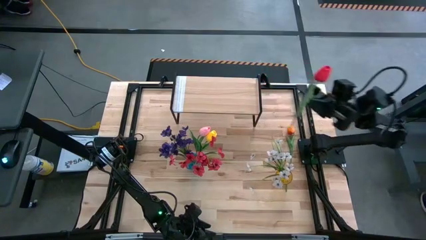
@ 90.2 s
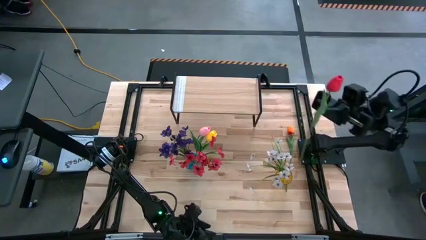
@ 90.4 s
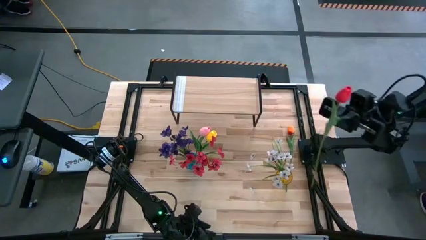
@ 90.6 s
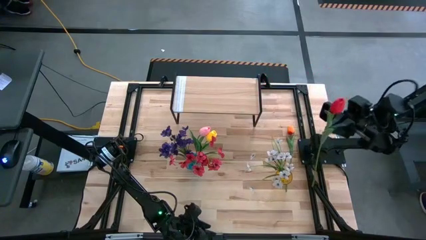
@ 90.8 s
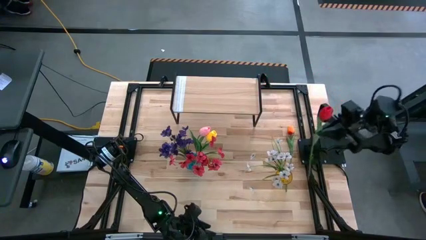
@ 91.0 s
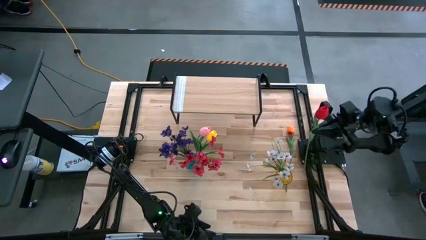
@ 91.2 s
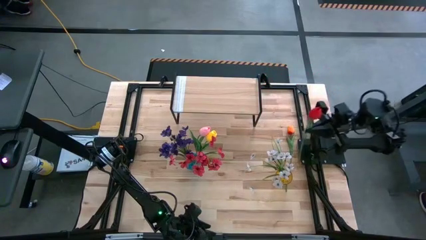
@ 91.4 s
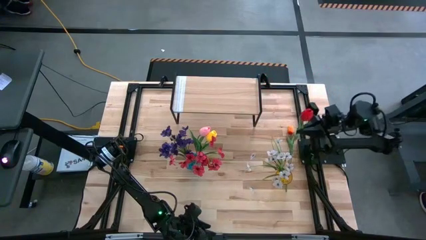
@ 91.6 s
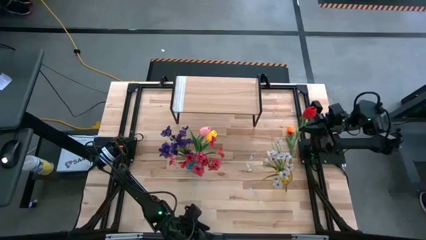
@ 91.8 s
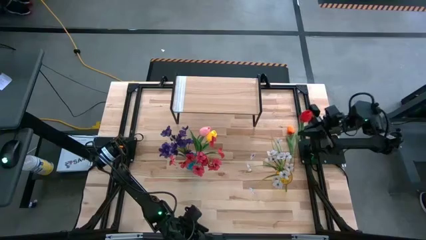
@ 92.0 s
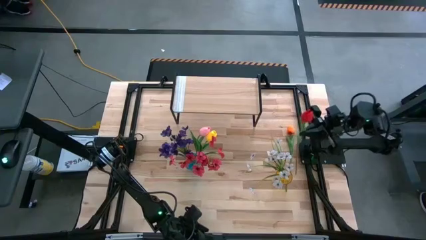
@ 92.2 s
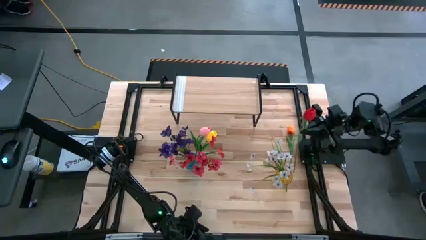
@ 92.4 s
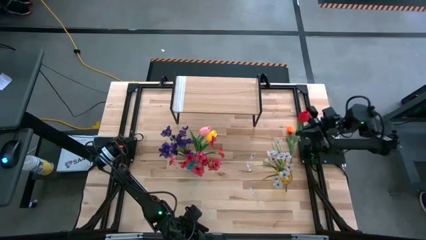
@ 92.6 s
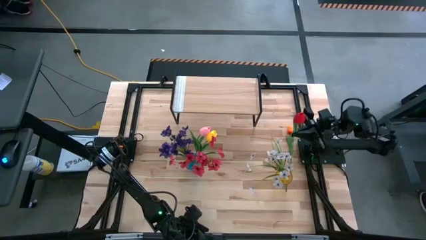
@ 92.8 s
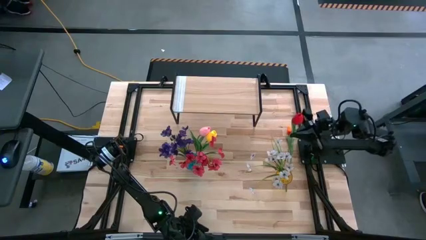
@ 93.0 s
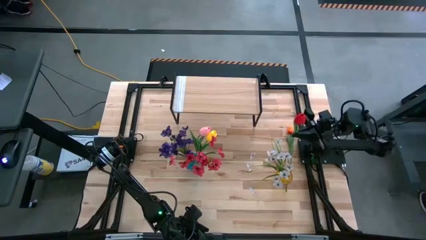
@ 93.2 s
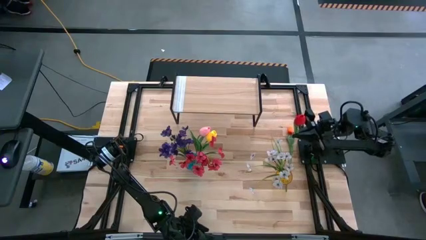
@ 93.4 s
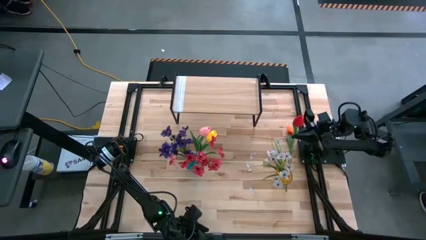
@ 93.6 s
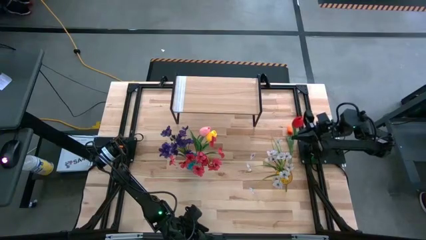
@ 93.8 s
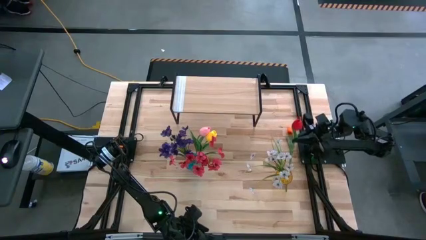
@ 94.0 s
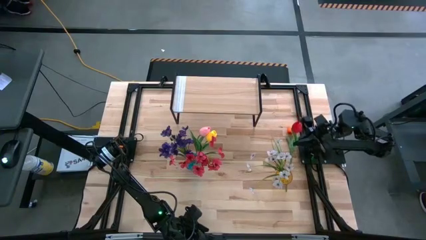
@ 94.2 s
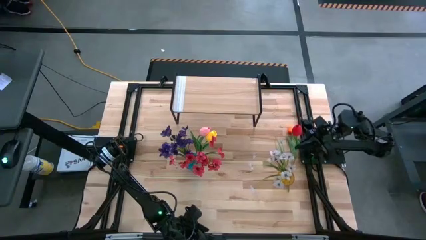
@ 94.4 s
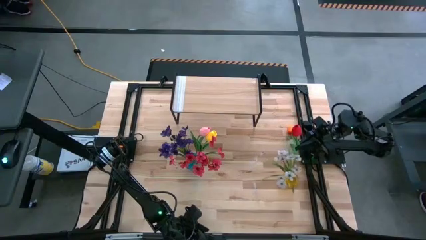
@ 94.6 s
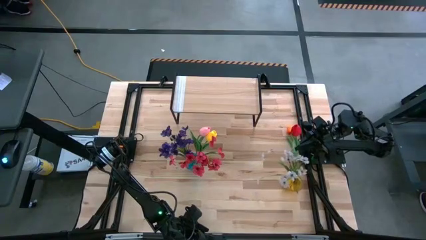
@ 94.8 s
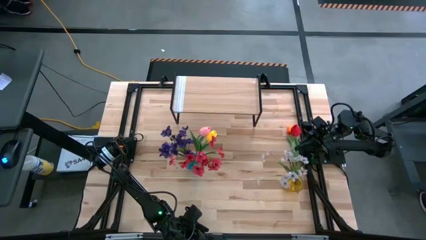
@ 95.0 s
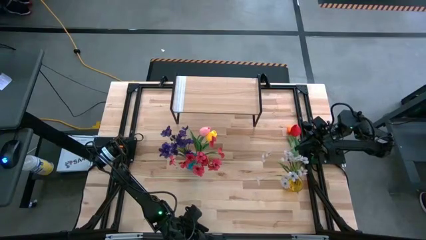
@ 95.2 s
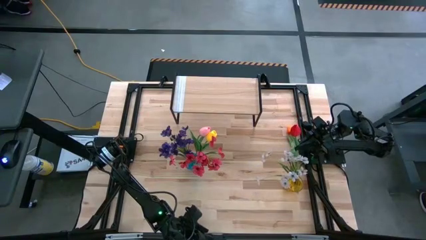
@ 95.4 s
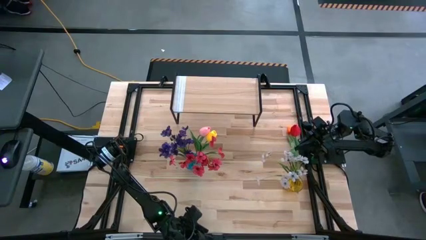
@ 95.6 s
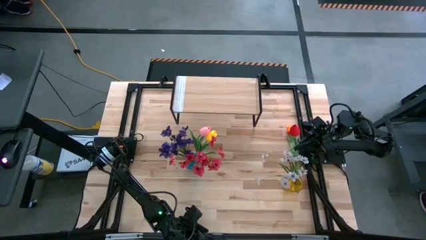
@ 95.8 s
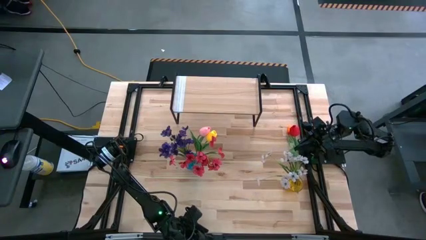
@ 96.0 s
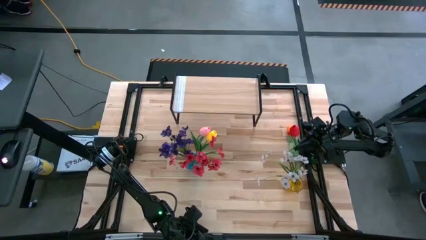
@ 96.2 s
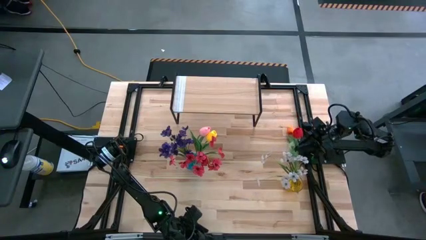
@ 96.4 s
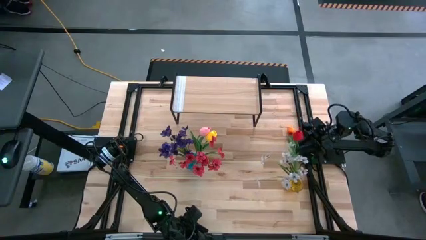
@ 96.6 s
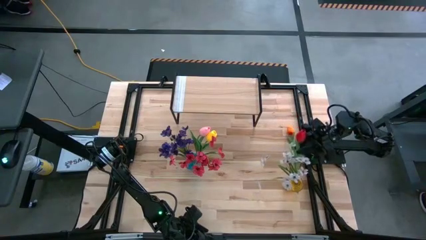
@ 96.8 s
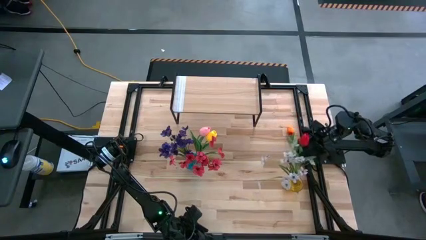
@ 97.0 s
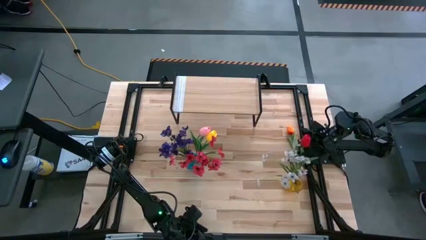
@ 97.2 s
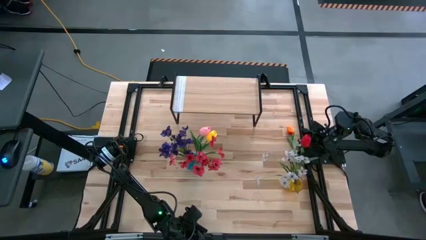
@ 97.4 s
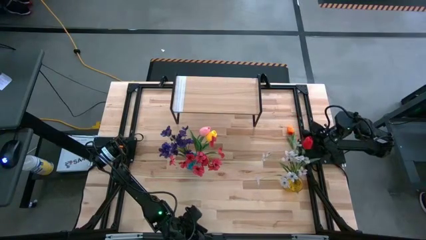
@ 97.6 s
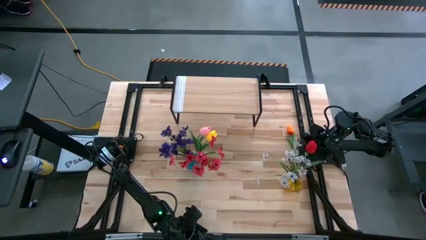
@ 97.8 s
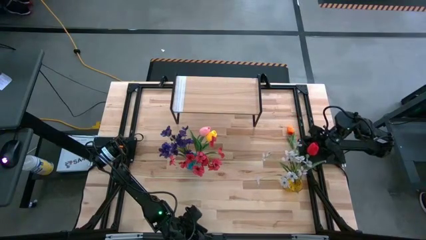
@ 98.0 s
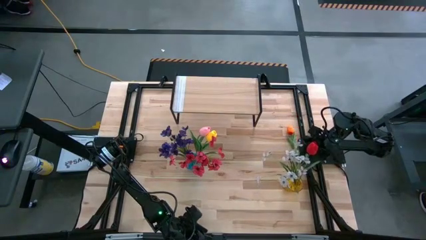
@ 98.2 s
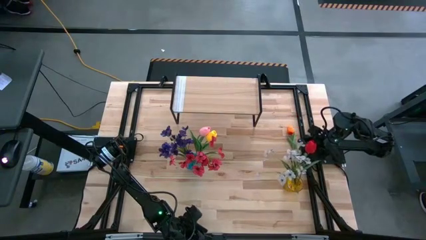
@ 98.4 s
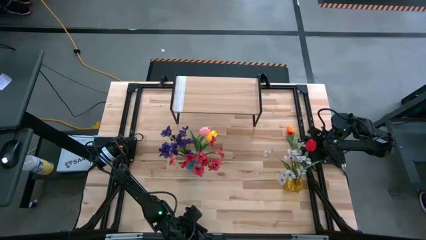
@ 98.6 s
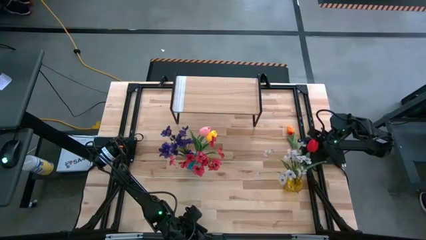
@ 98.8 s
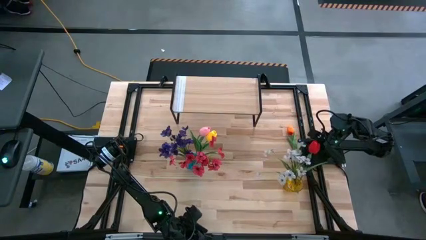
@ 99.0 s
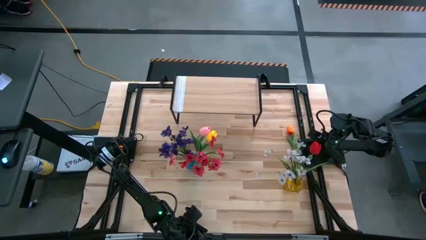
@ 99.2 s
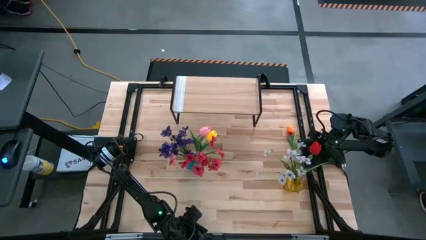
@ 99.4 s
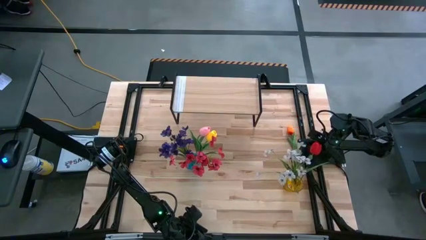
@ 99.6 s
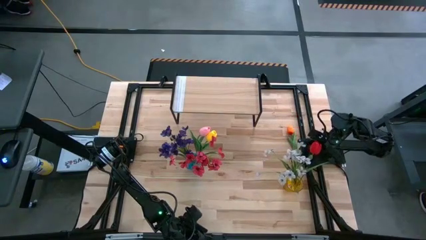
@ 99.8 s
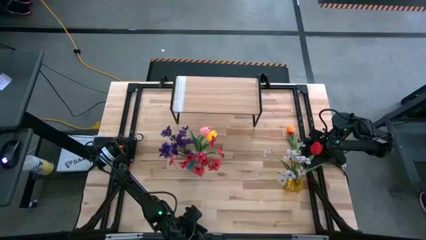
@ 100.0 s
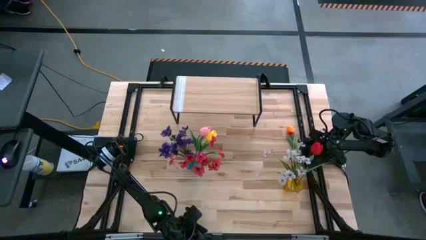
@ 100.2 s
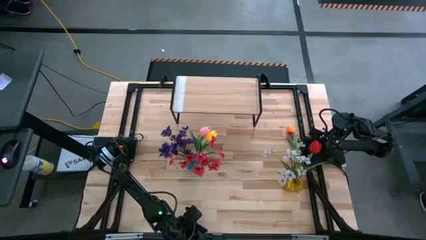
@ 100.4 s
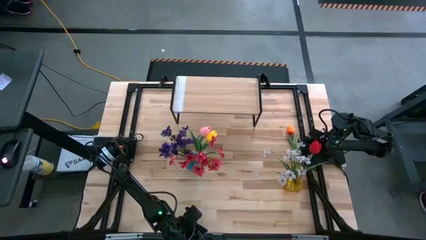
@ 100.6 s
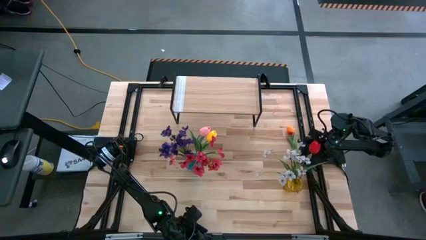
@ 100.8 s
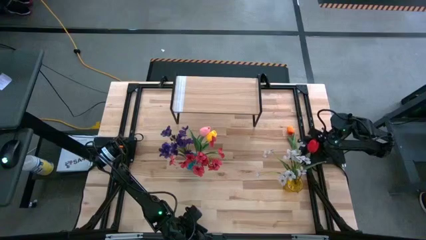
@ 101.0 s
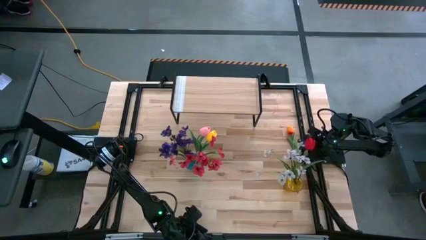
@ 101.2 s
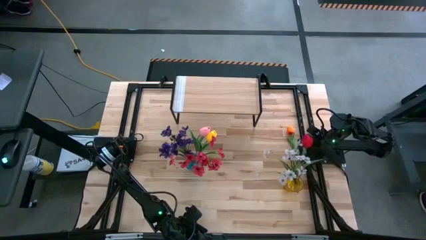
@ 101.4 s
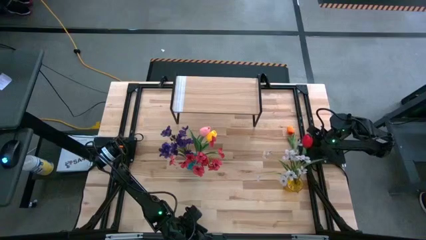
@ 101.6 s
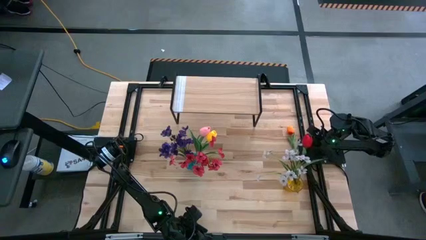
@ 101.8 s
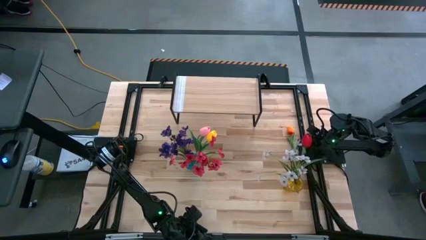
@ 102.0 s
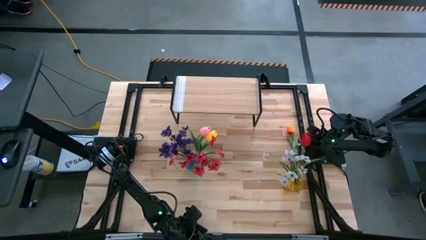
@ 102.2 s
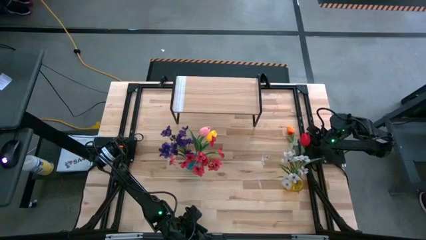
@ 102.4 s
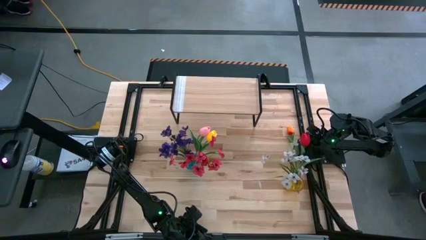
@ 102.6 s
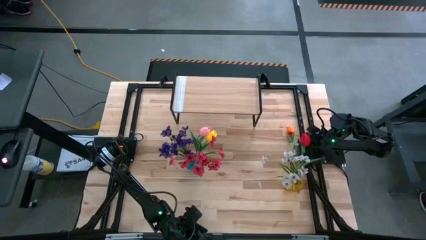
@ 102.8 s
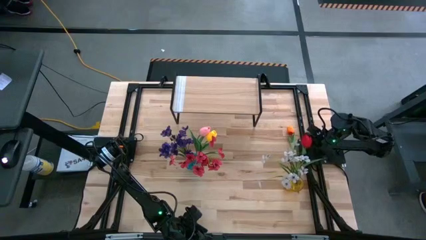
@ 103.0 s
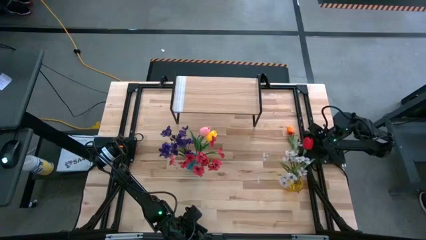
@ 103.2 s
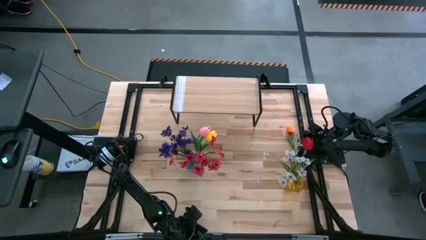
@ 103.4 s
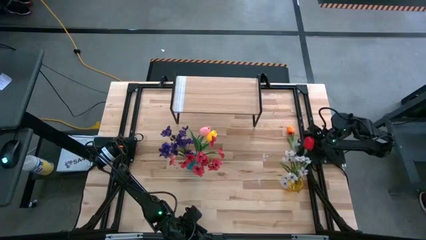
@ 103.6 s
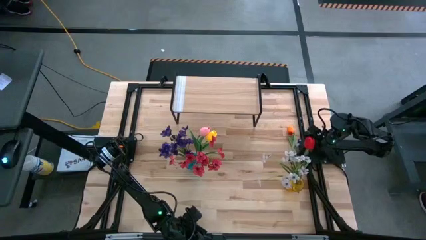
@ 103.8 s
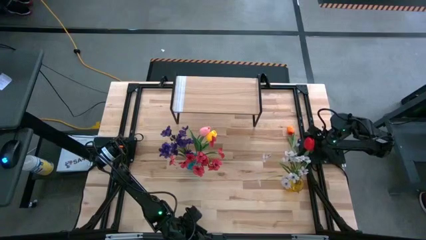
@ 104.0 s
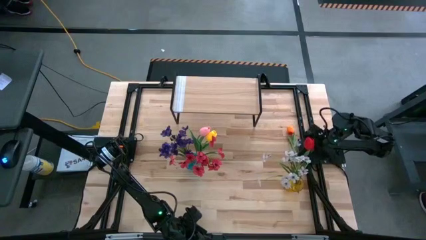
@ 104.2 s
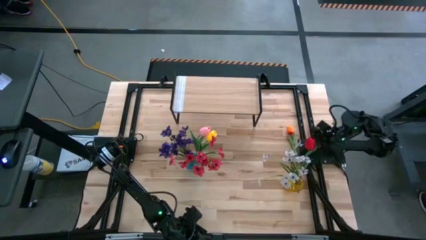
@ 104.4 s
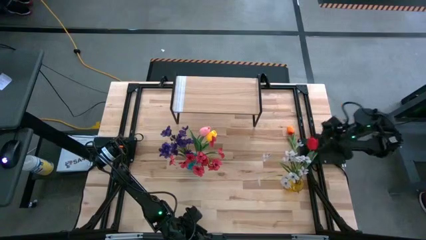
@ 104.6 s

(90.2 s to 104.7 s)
Task: Pick and place flowers into a vace then onto a shelf
Put the red flower into the yellow vase
